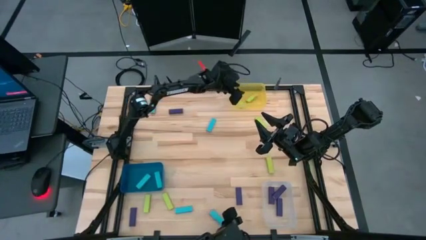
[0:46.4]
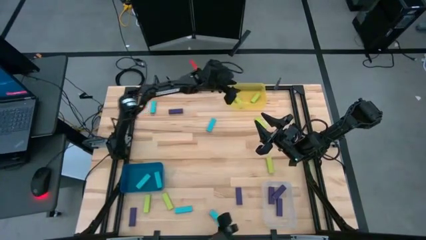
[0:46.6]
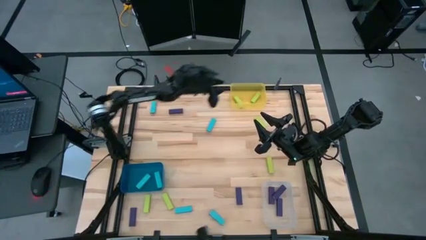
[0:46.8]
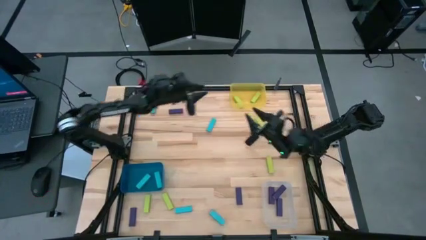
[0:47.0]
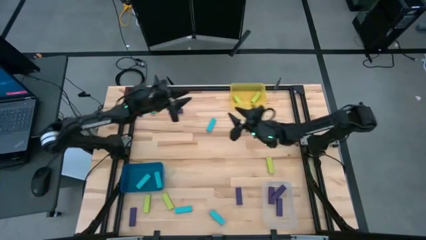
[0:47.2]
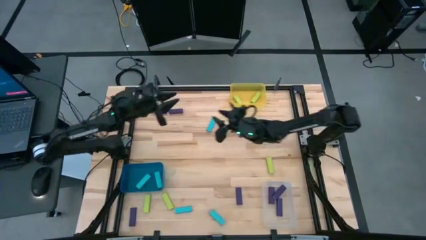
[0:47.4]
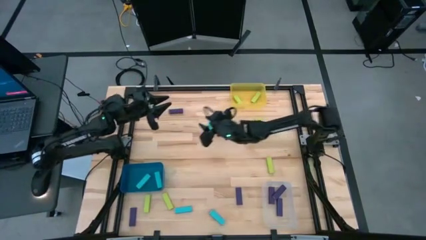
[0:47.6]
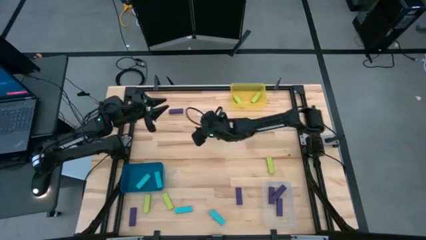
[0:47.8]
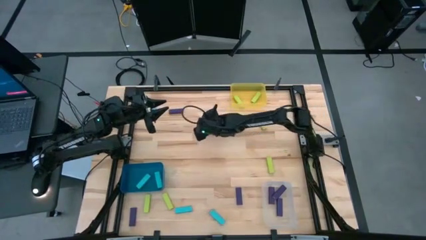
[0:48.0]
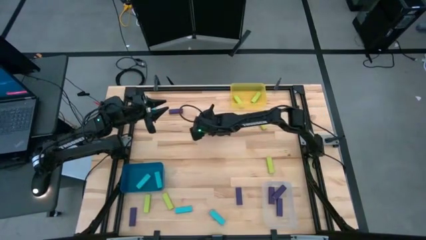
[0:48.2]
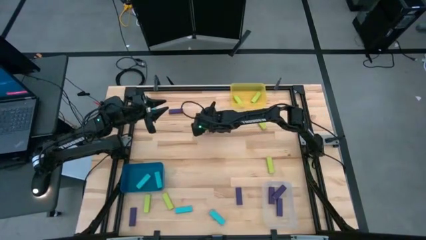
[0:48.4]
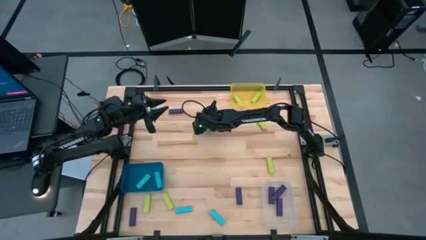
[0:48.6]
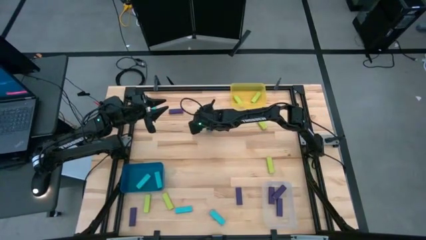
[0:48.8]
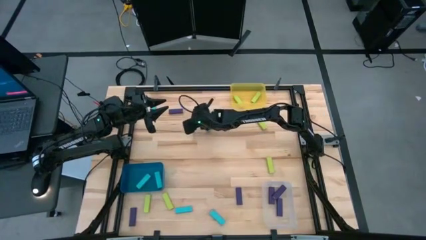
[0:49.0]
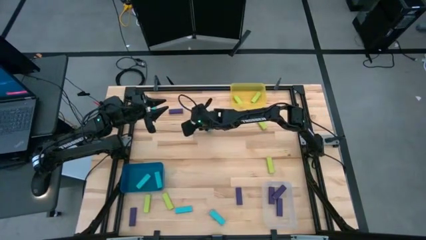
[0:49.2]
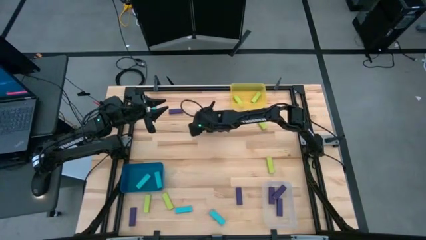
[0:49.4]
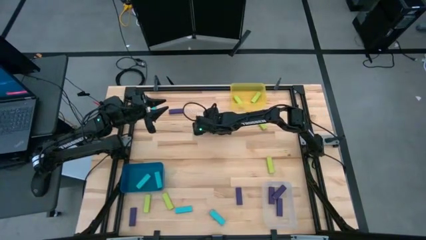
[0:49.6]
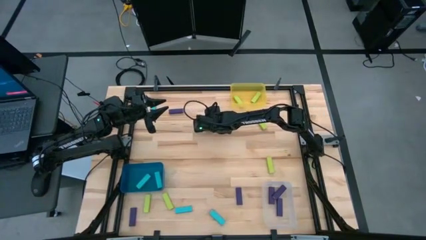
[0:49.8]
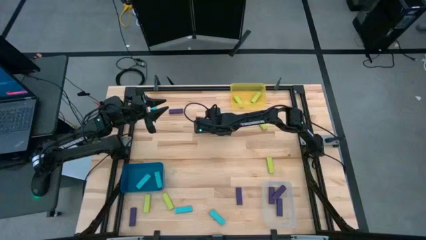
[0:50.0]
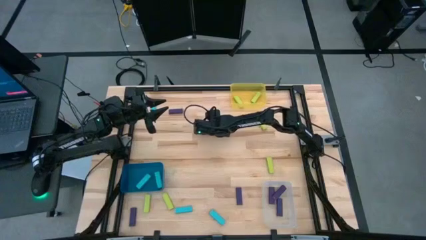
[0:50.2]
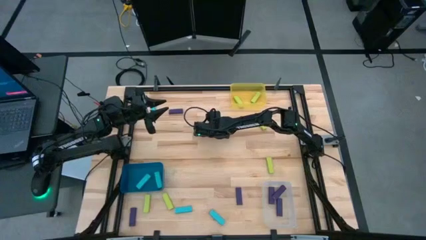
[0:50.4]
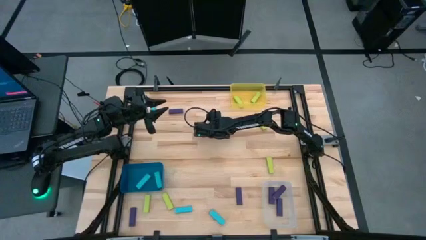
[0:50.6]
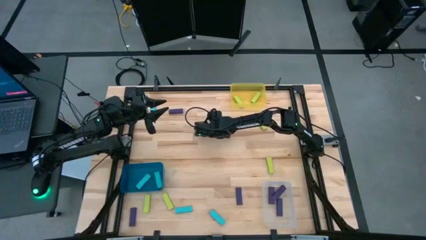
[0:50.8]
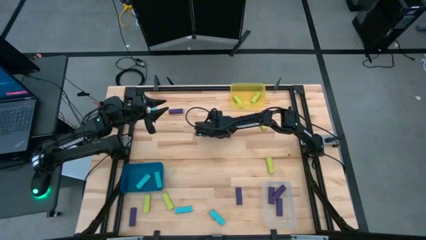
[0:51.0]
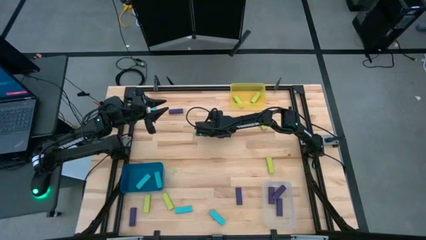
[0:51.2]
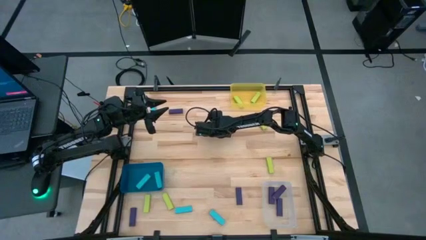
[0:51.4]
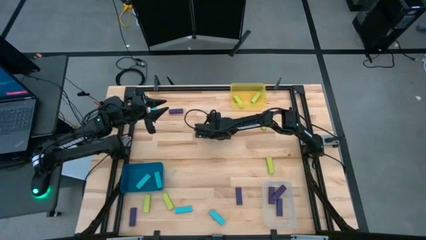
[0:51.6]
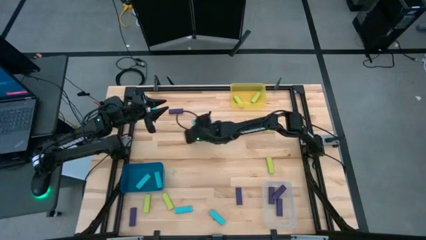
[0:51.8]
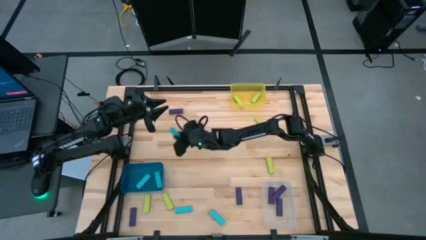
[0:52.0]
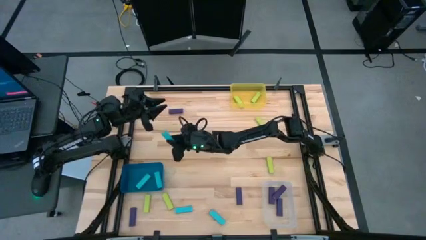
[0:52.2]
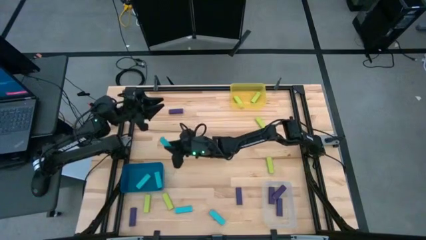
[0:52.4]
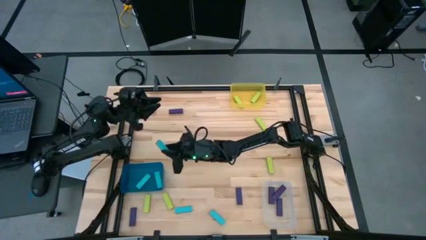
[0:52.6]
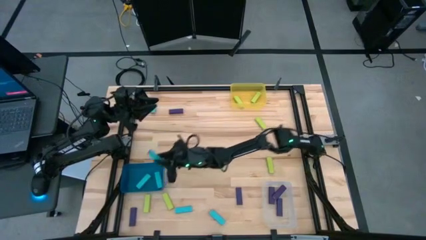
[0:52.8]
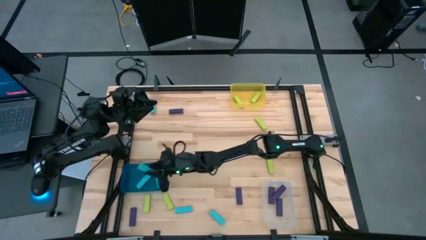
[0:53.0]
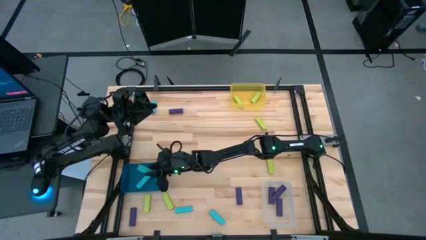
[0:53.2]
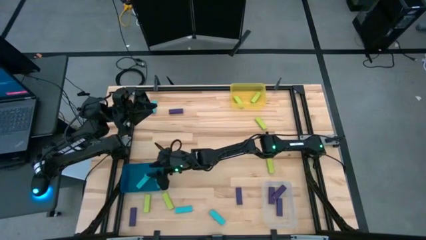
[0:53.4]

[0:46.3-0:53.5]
Task: Sort blocks
Put the blue block into the dark blue bin

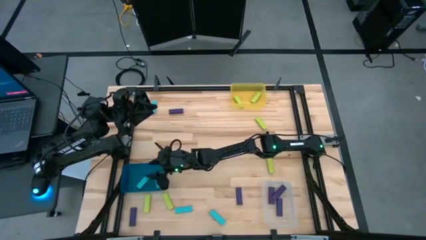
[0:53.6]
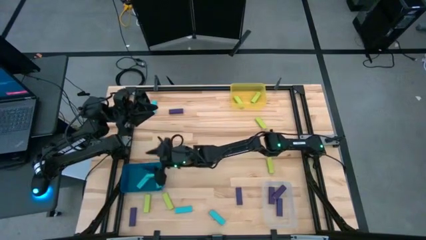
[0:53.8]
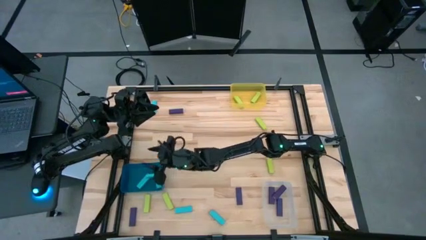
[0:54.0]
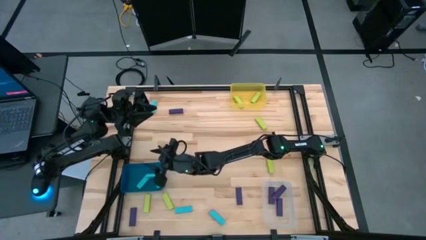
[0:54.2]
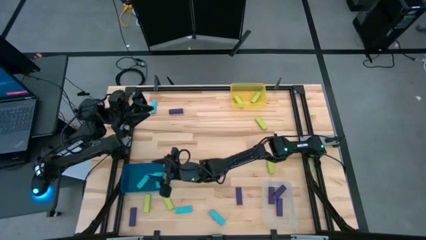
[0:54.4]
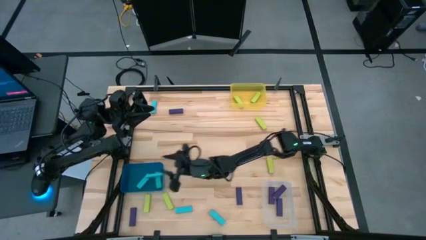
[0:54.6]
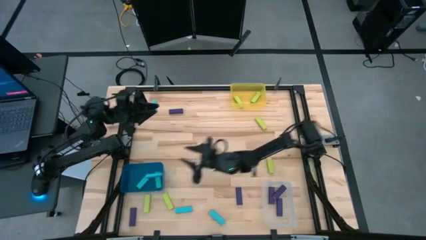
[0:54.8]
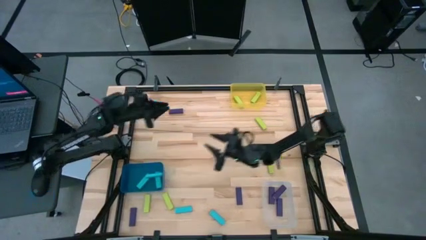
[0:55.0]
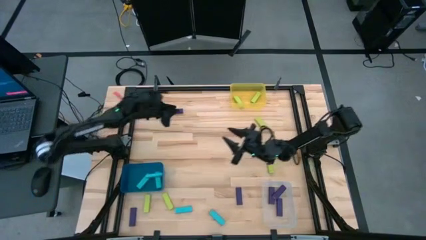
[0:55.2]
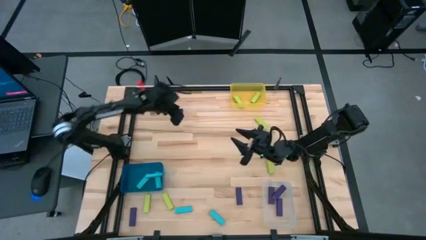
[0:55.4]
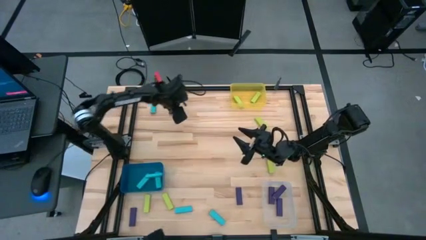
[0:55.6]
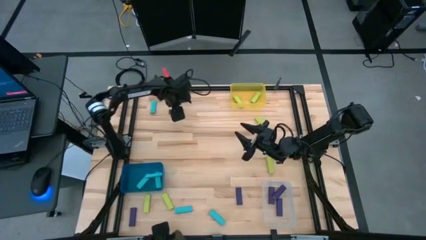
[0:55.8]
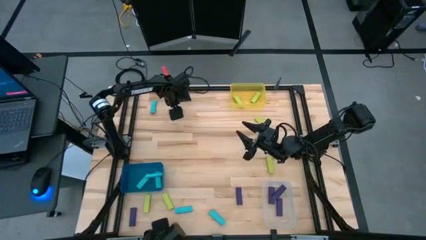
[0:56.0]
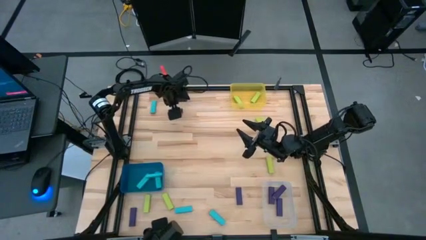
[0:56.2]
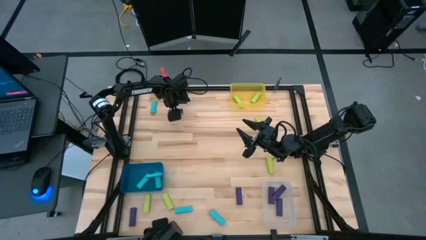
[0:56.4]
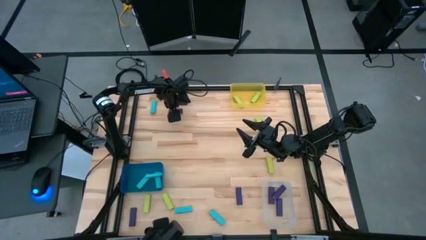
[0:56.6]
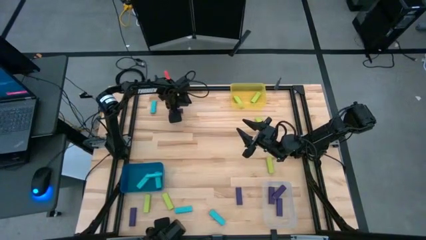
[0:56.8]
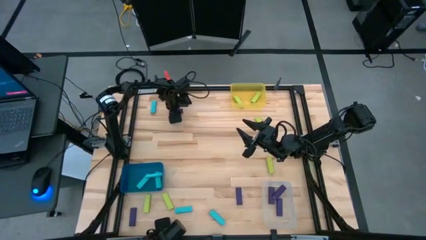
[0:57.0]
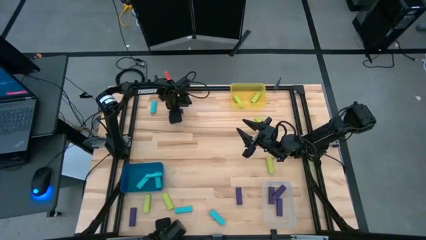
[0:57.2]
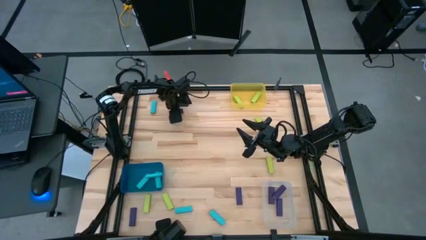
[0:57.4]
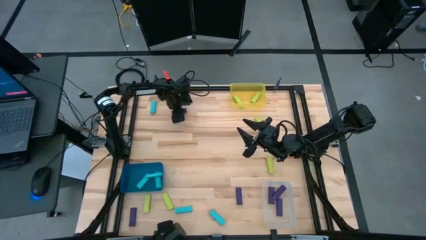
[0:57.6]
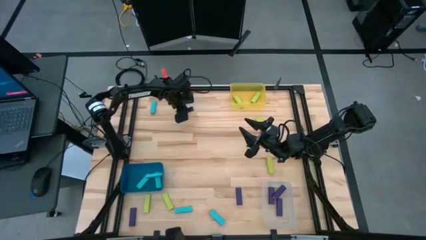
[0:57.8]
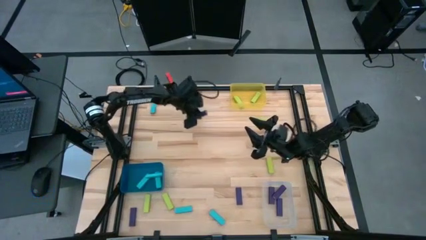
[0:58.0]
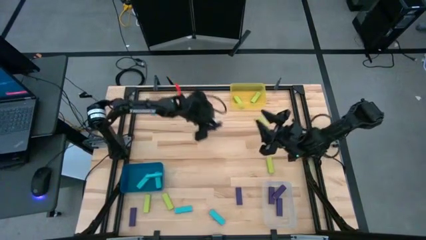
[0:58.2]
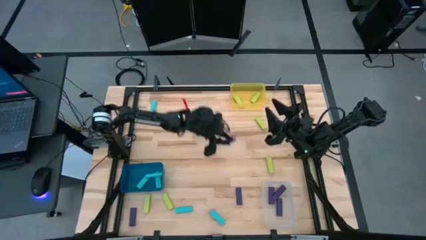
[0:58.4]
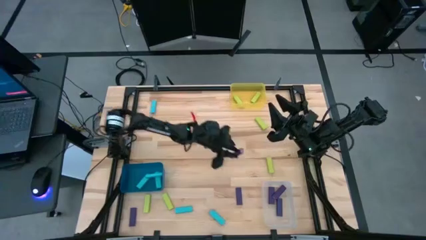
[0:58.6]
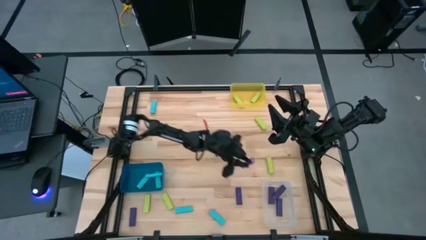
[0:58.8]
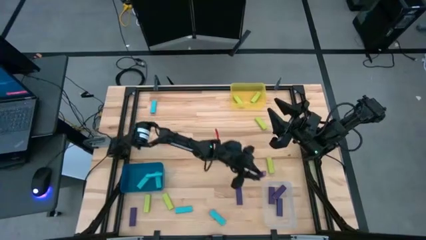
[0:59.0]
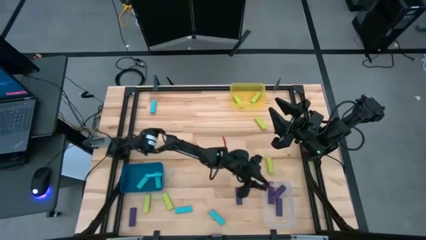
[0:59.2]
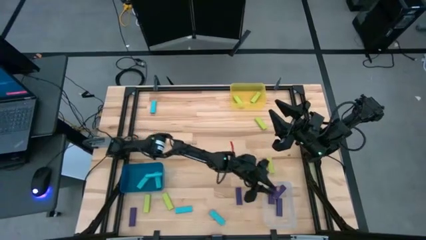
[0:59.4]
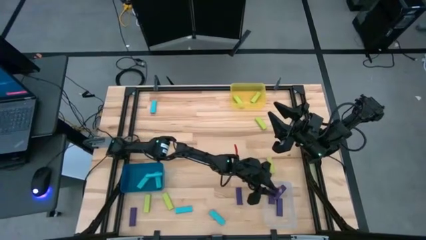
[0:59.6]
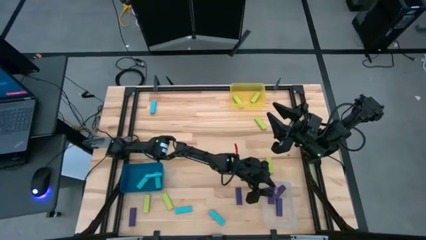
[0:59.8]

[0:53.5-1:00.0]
Put the top purple block into the transparent bin

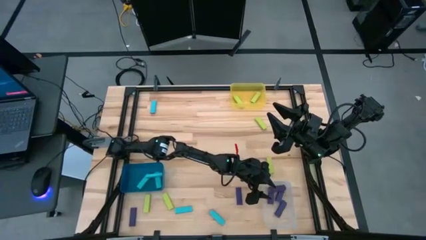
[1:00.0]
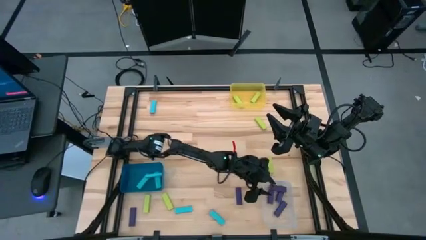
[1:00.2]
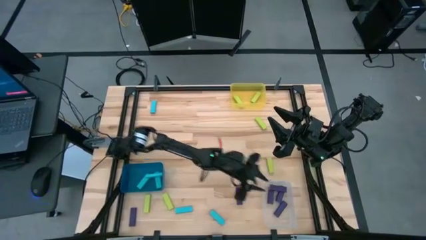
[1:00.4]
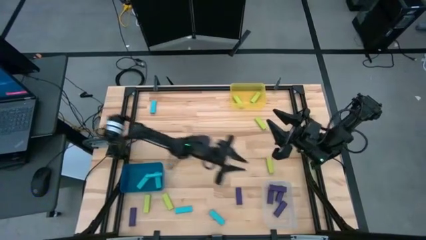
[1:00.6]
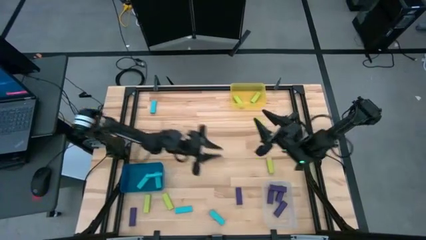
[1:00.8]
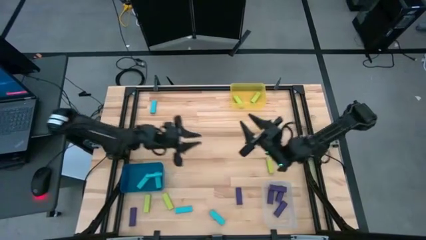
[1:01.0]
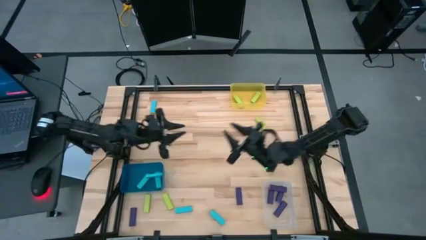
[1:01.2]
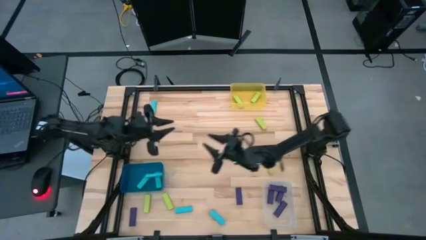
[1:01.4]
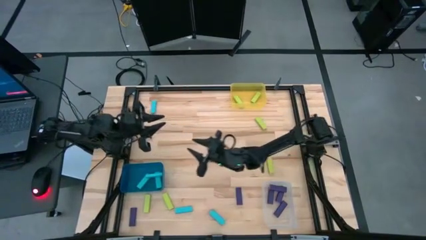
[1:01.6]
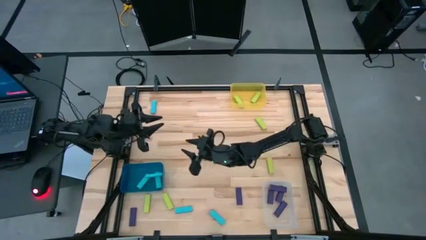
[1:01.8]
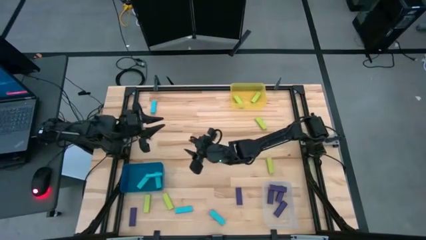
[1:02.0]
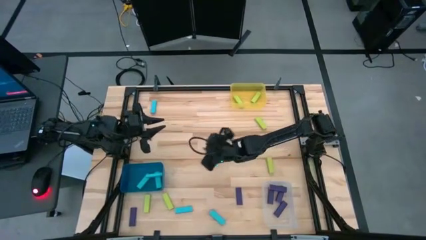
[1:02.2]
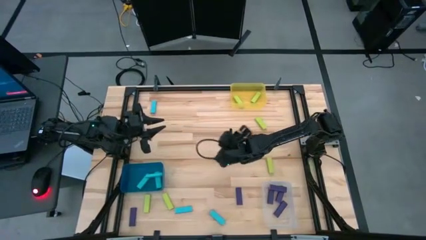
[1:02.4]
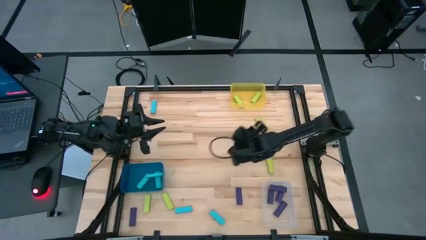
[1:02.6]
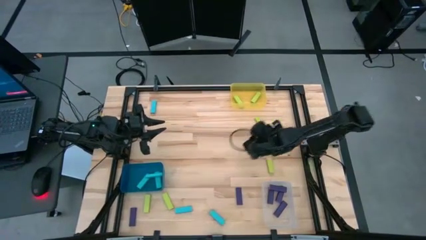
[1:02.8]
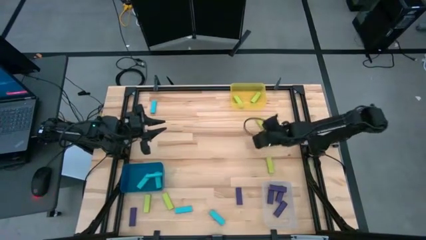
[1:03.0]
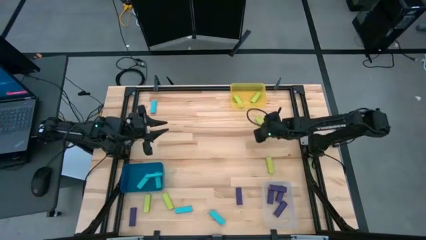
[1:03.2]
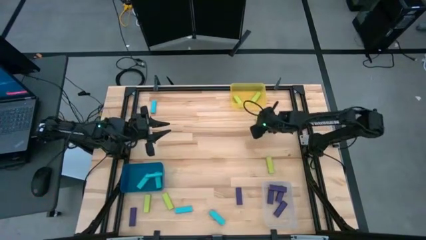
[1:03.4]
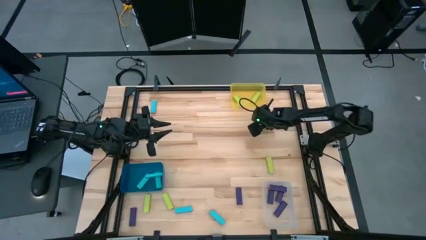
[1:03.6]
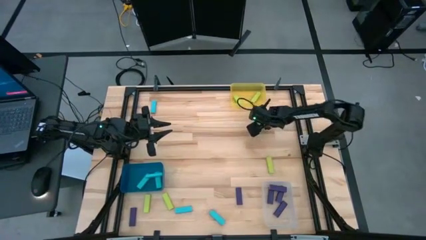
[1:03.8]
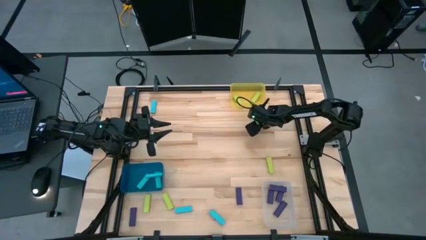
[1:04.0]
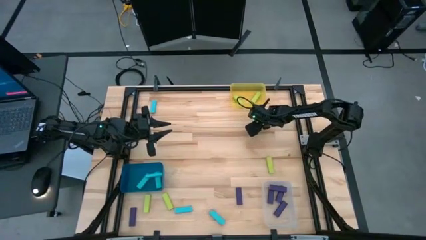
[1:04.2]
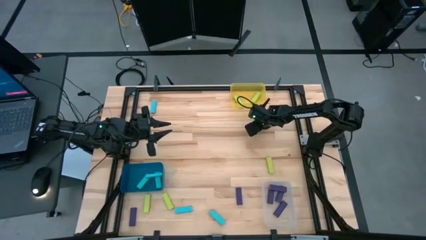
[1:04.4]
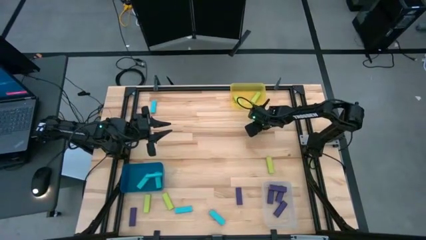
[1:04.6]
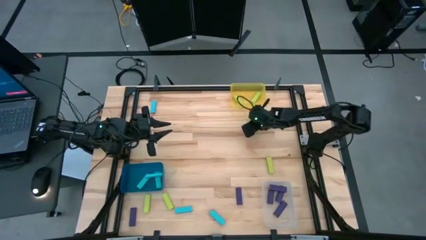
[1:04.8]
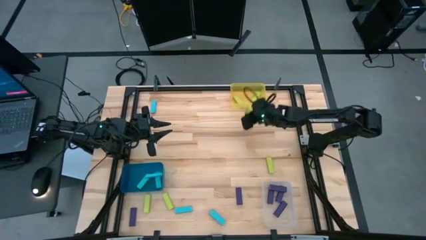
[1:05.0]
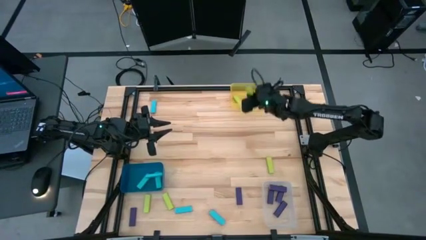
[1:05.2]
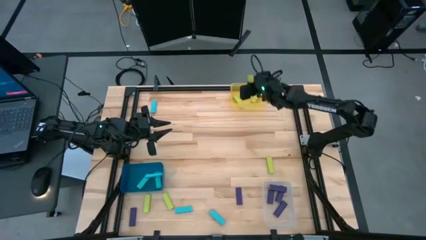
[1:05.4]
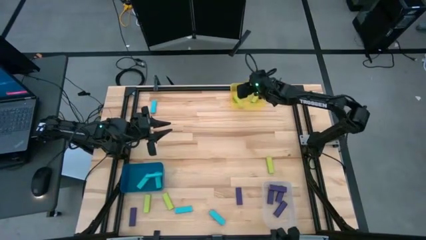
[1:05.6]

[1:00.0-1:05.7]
Put the green block into the yellow bin
